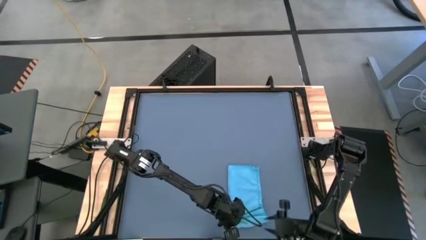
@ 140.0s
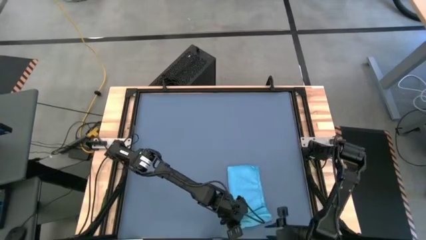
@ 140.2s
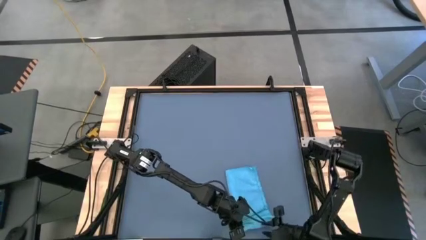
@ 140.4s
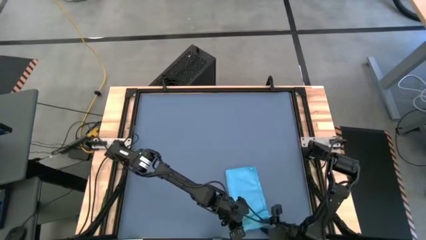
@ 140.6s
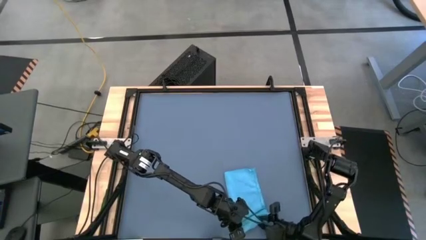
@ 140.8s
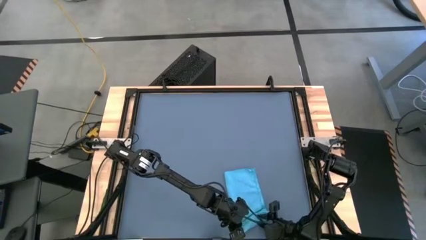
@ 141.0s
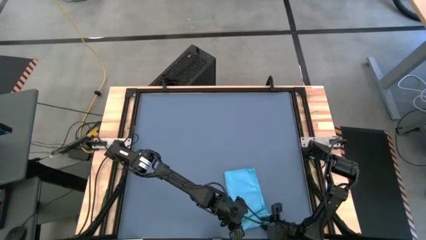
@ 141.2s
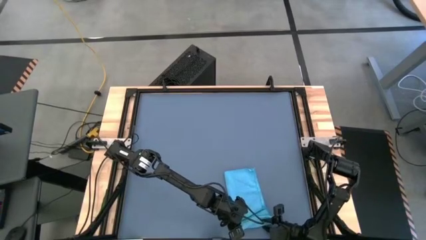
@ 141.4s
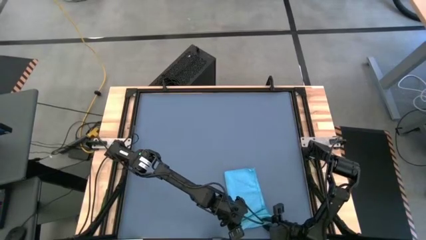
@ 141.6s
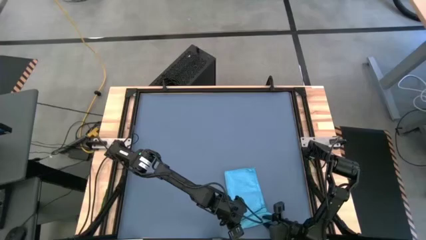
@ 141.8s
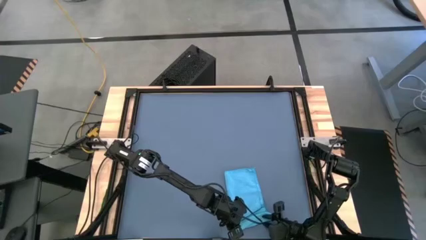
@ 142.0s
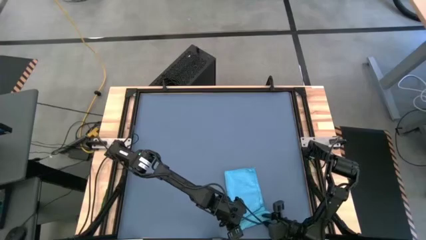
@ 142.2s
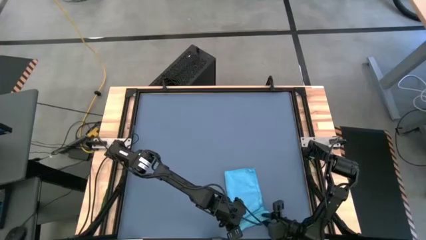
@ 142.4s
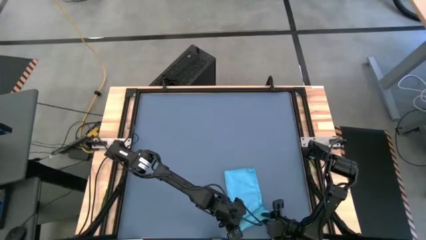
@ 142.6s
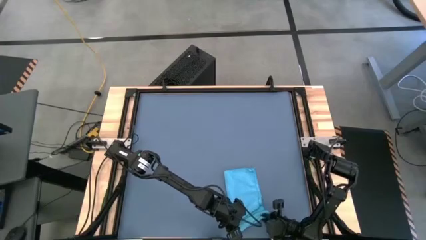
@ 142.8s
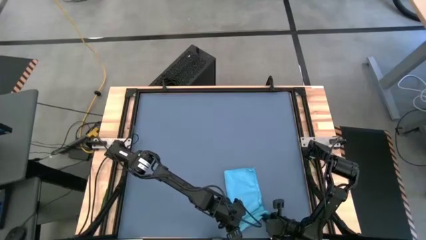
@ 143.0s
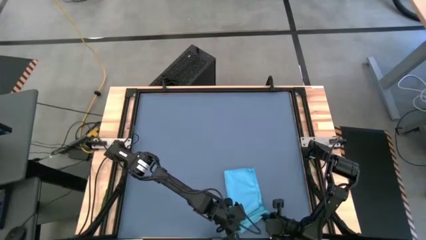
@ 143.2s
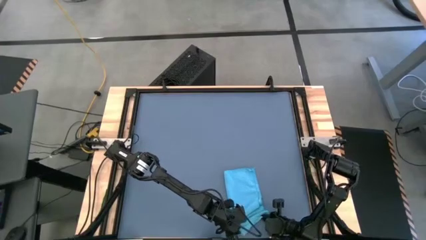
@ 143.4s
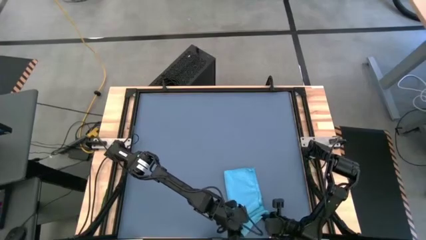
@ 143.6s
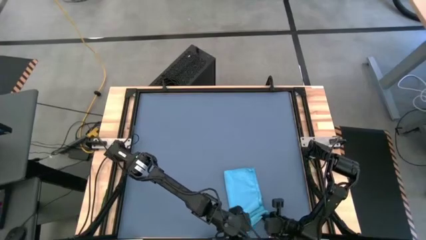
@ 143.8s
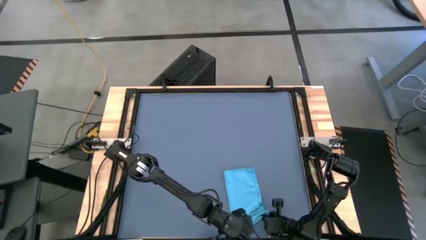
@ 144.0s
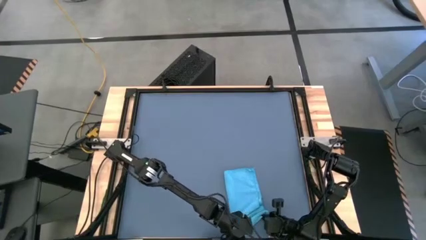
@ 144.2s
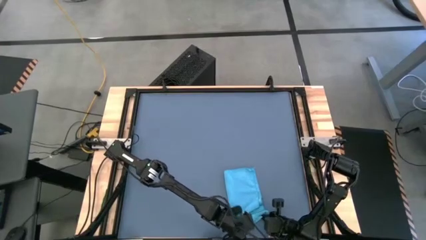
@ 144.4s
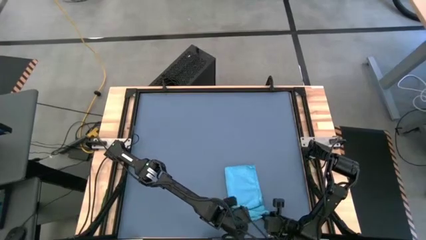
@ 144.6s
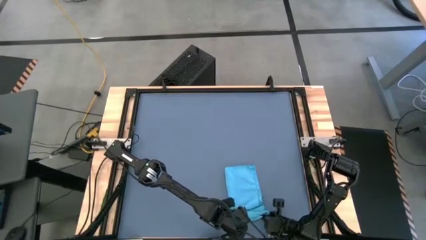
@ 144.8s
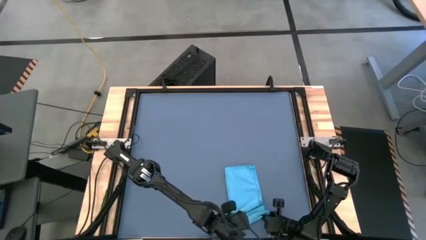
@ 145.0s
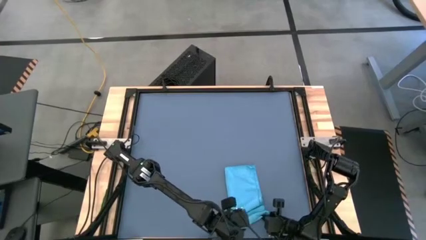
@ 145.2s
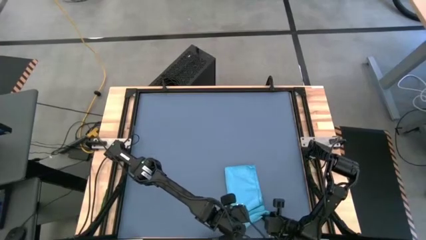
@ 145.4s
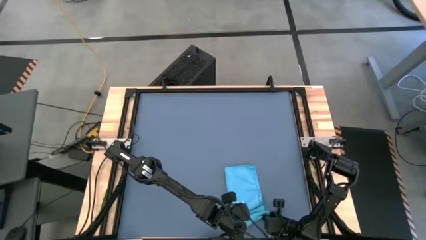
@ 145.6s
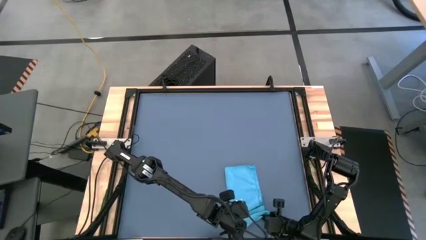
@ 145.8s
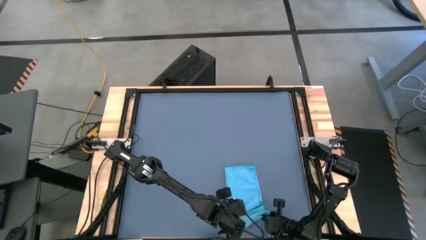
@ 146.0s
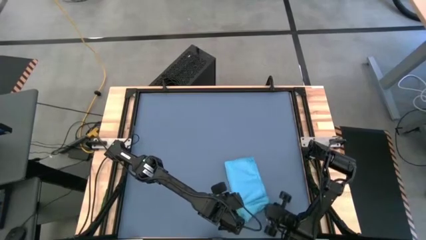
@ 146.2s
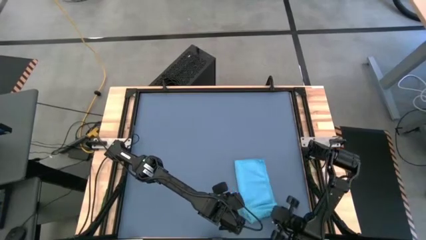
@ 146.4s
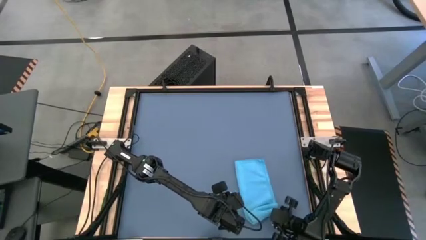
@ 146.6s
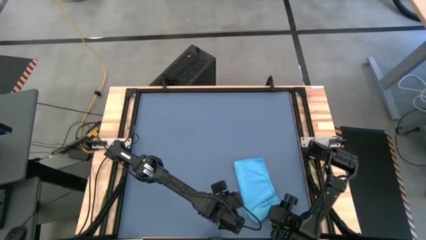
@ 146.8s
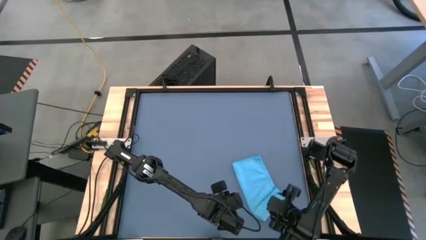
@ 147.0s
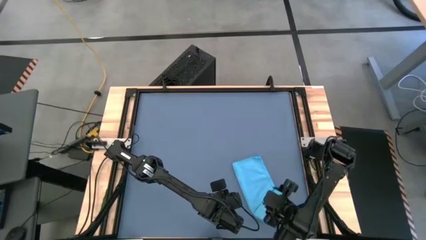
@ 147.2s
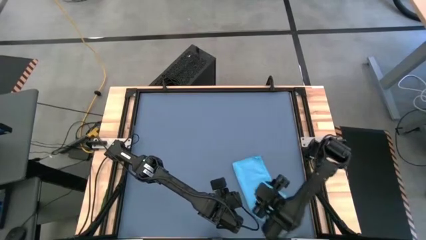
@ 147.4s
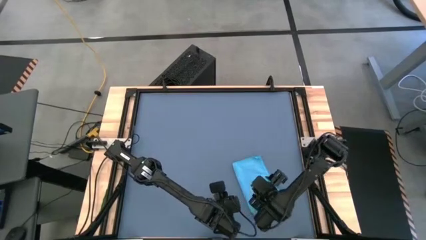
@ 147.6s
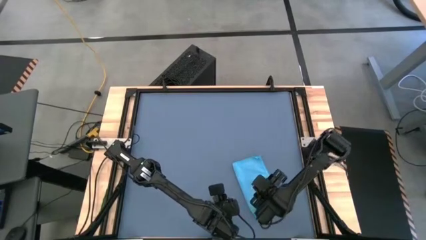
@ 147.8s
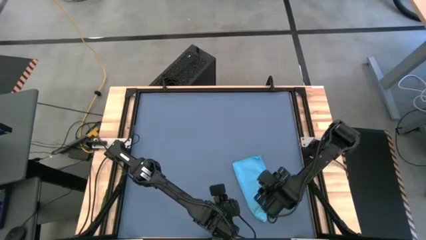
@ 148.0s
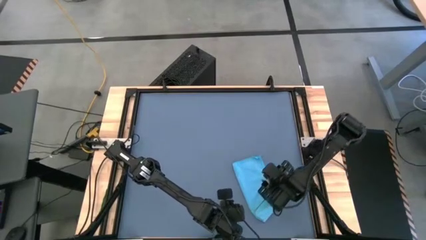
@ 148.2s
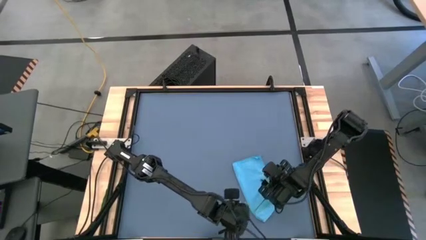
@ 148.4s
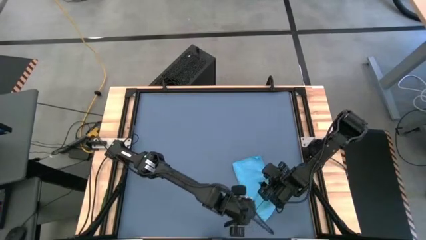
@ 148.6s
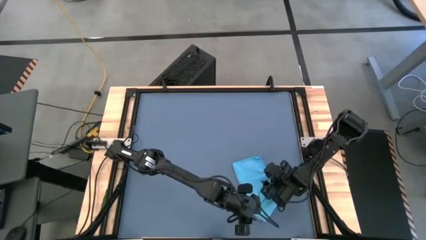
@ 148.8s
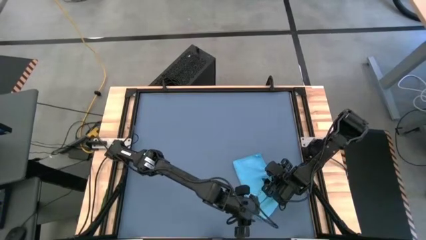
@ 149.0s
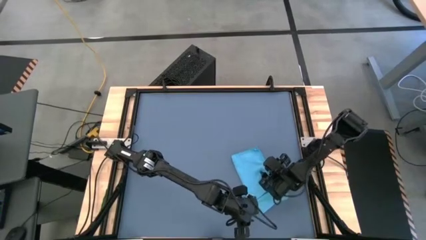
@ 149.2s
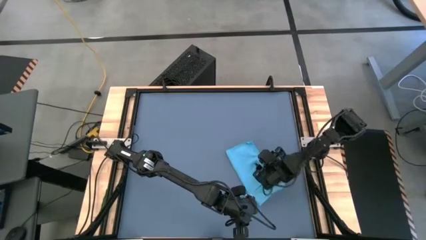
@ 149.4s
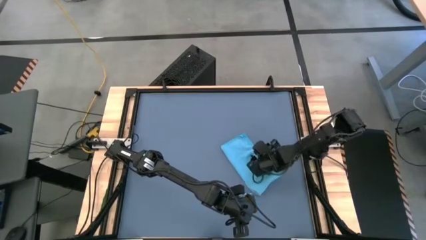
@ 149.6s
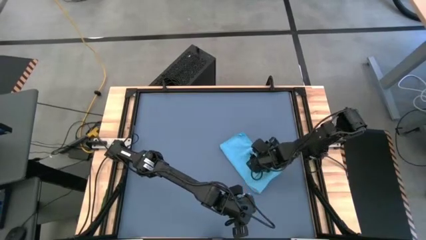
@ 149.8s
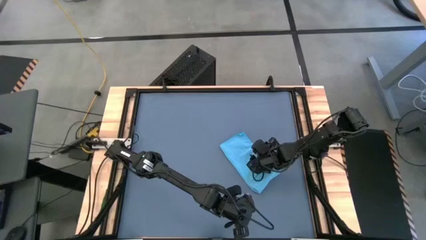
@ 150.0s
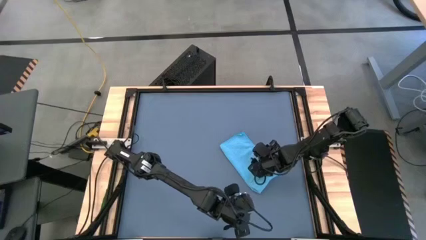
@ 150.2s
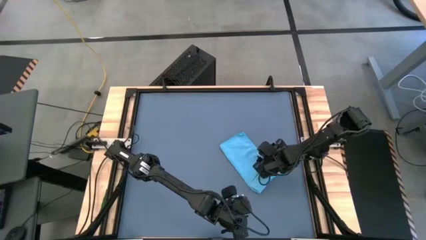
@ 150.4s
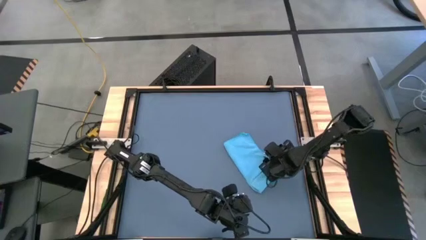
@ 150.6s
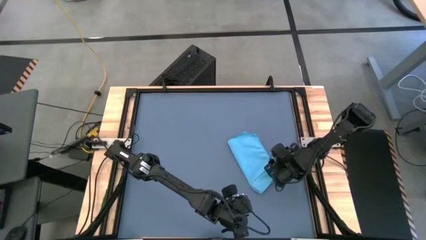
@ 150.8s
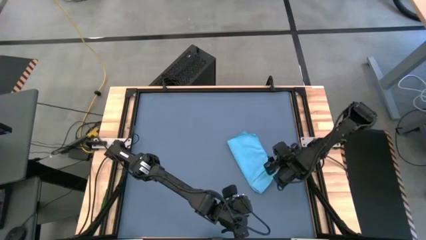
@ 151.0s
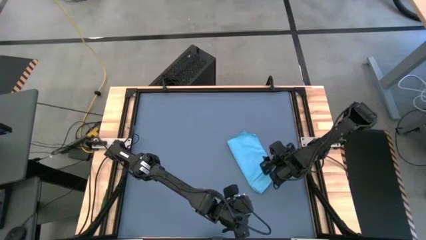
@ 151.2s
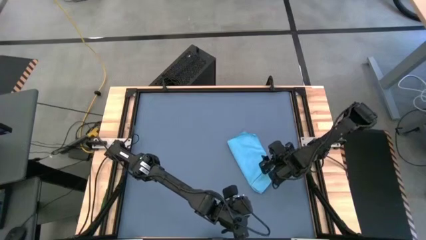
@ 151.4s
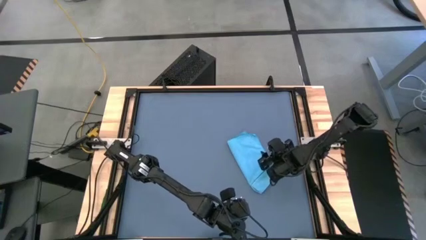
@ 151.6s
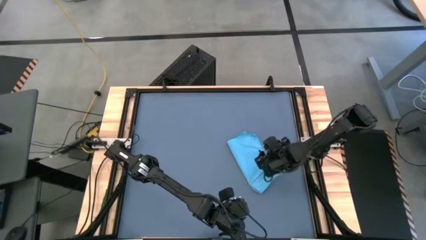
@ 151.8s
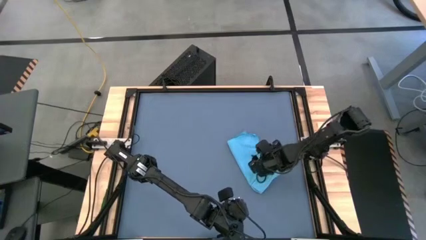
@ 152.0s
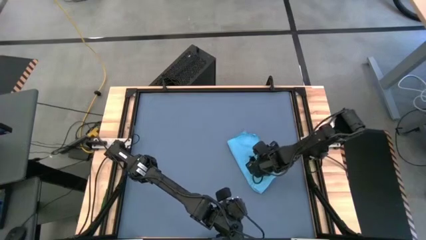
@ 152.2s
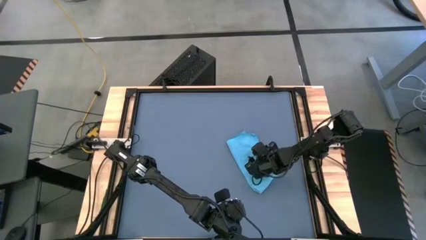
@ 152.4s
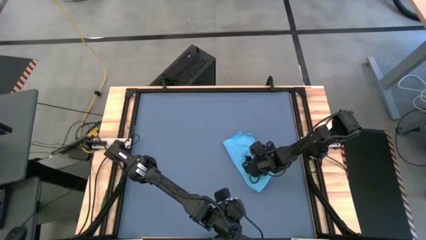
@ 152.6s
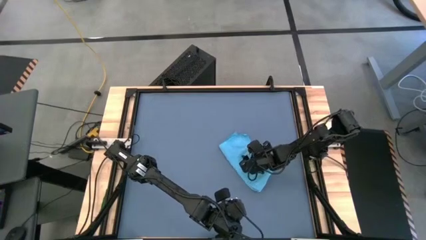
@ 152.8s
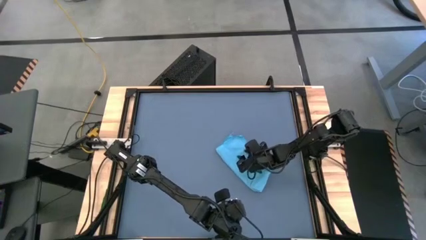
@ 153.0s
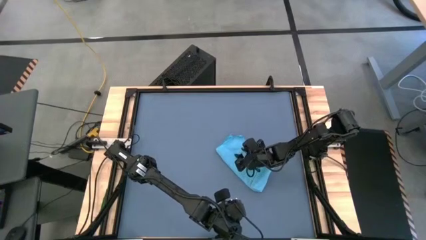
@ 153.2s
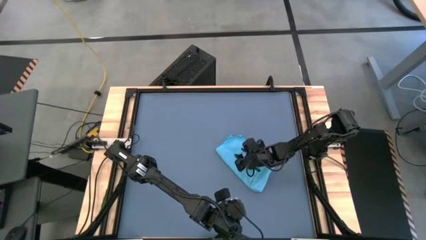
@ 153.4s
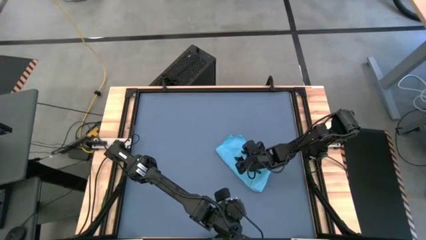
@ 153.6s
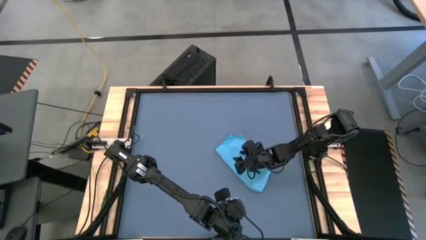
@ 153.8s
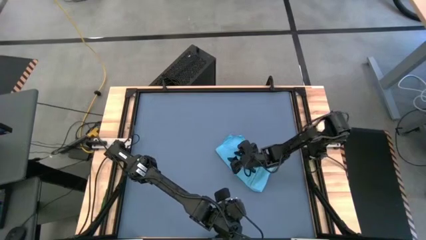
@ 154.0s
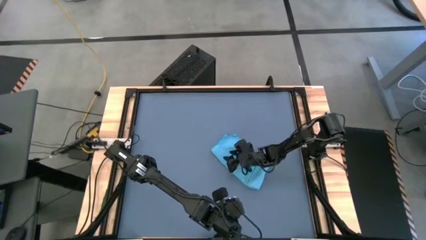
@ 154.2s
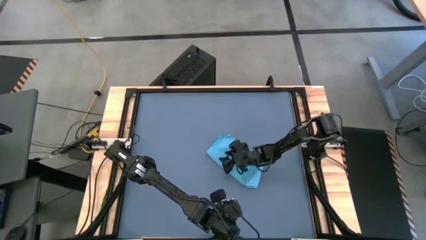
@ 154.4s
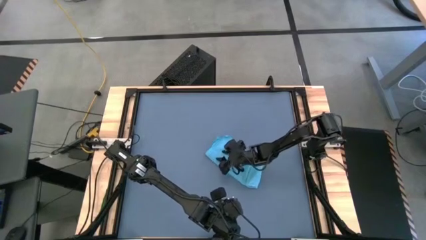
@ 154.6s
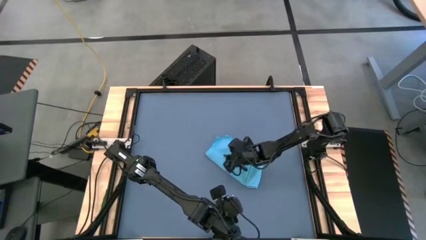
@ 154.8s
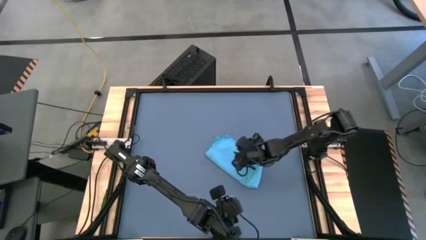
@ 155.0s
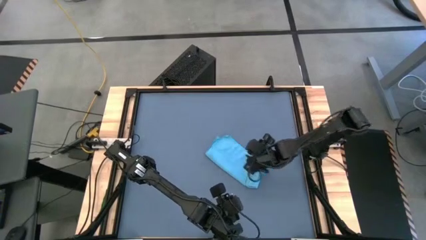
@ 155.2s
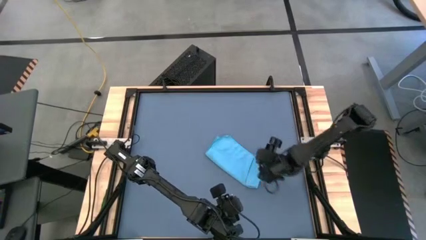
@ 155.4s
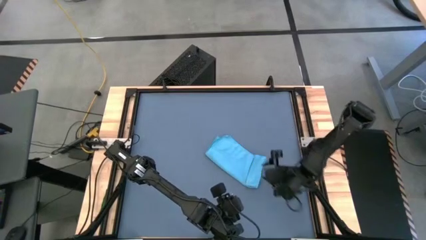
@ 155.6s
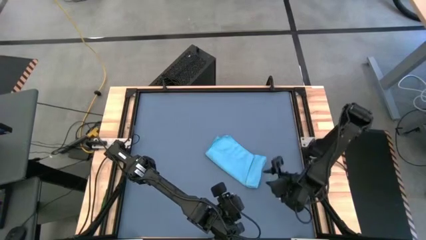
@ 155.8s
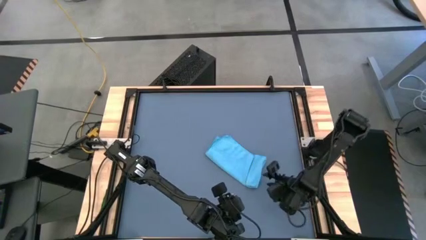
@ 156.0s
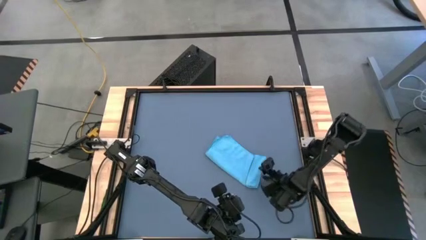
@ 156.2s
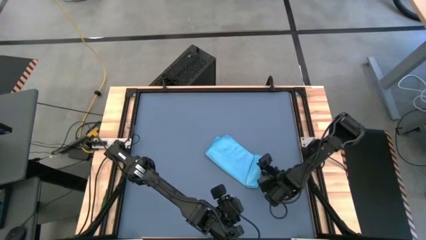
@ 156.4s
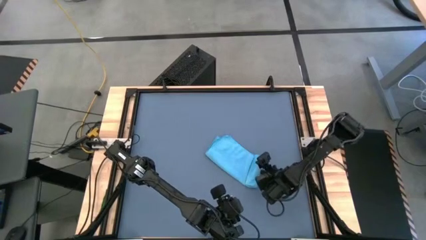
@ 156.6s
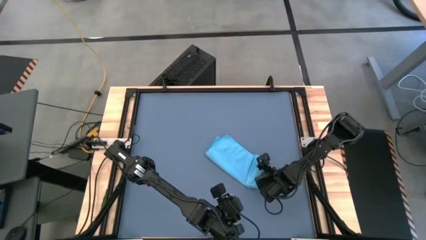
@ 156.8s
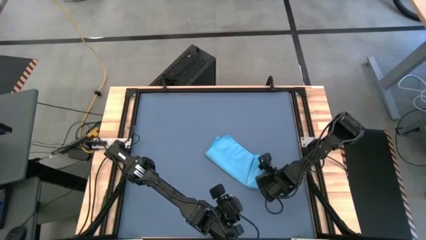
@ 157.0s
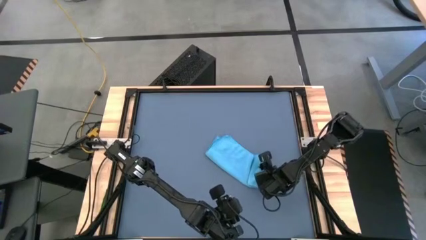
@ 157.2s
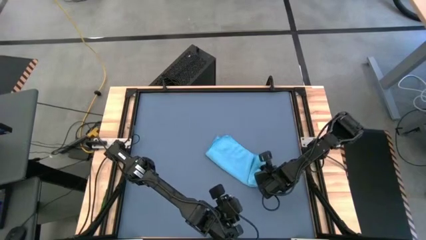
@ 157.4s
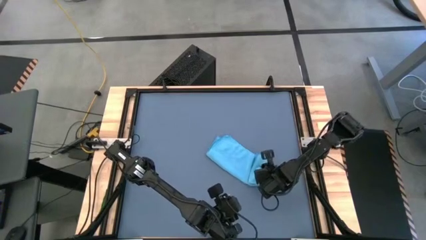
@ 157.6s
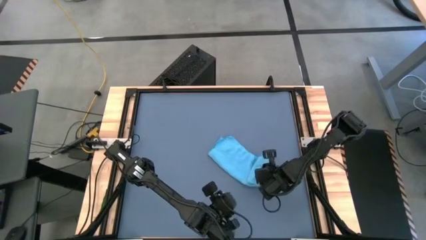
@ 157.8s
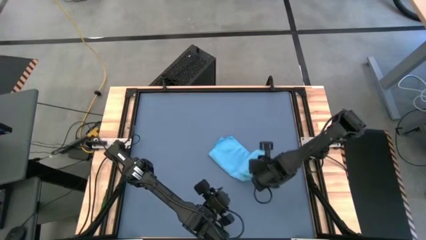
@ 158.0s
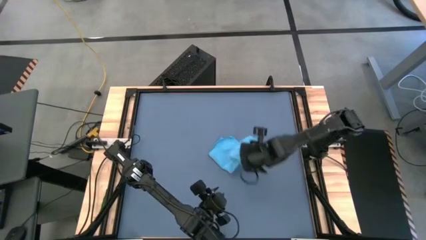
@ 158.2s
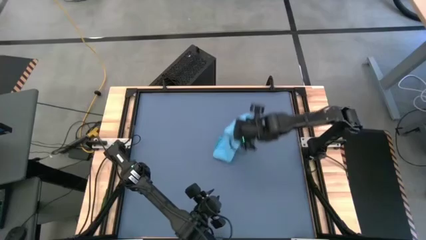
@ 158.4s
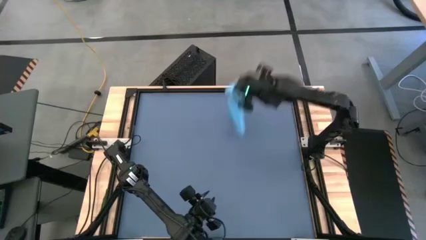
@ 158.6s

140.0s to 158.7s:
Task: Roll towel
Roll the blue microfiber towel
